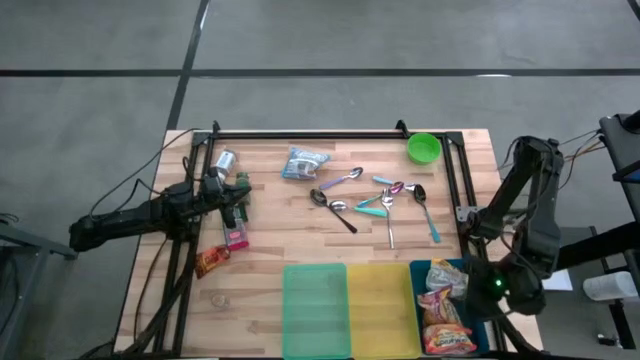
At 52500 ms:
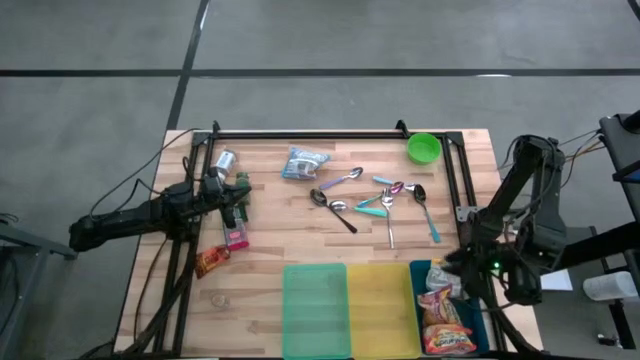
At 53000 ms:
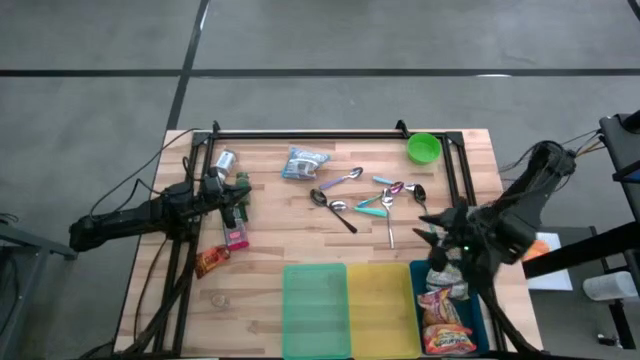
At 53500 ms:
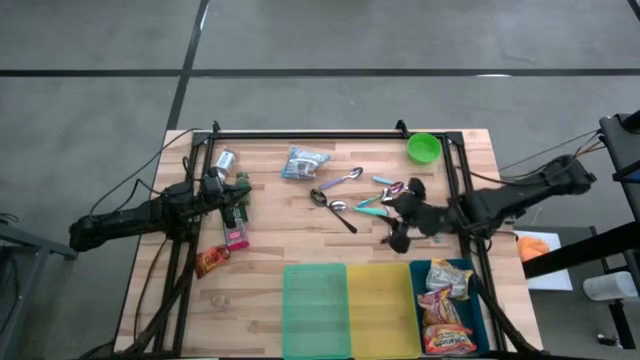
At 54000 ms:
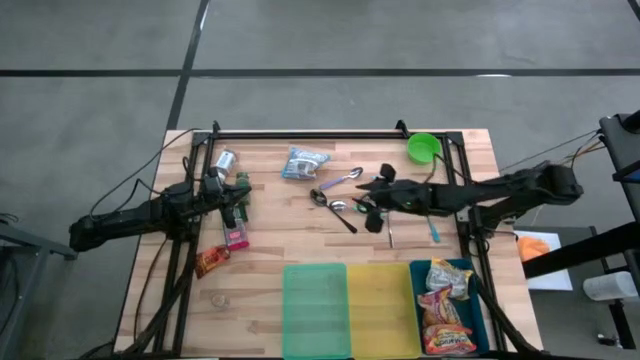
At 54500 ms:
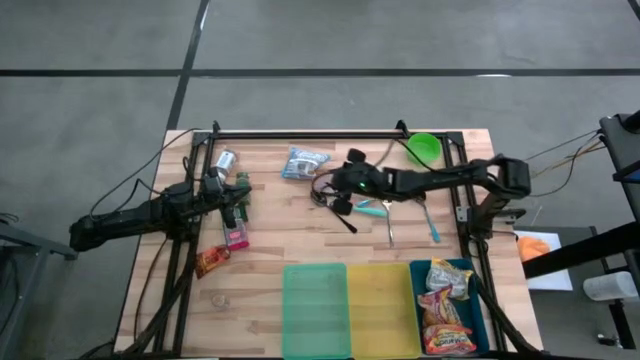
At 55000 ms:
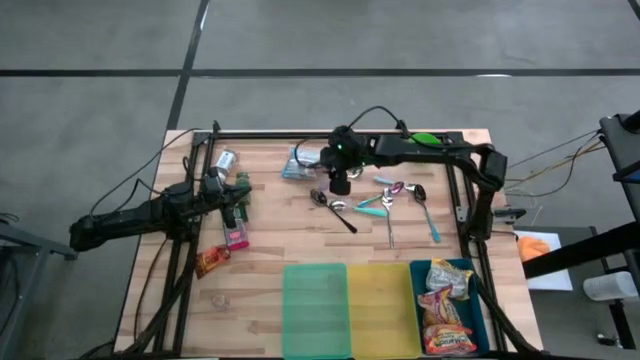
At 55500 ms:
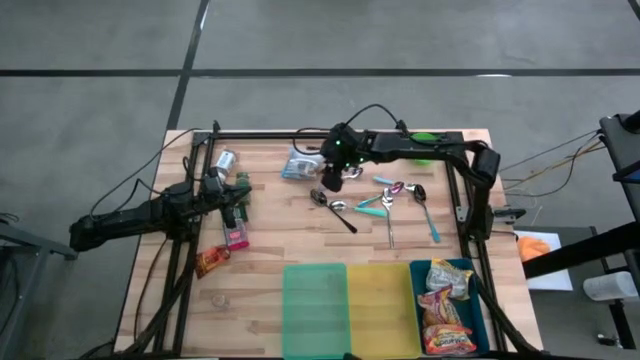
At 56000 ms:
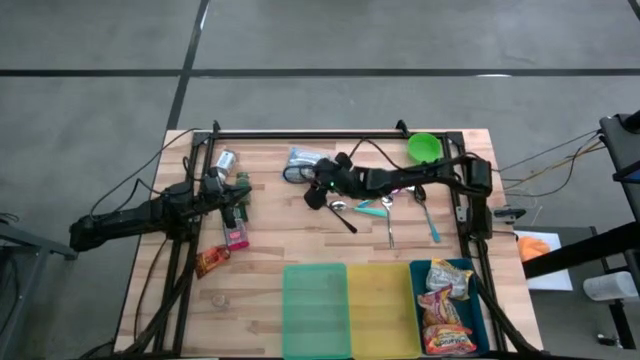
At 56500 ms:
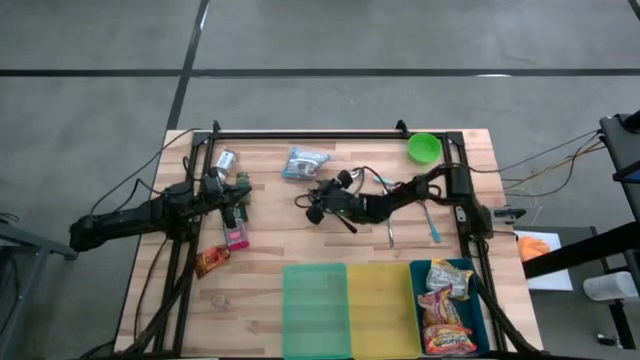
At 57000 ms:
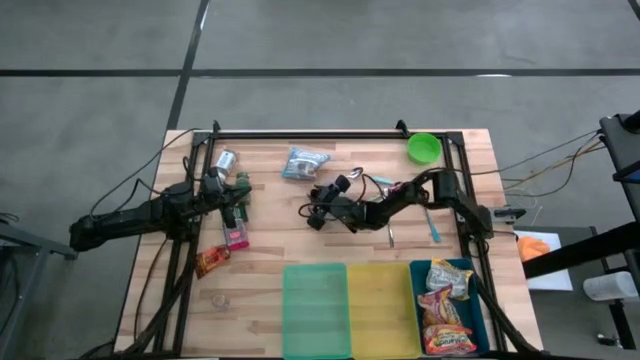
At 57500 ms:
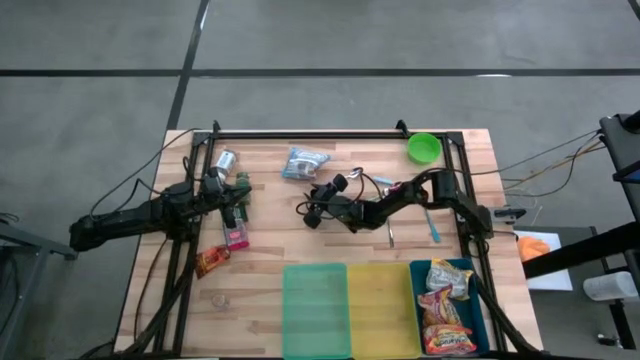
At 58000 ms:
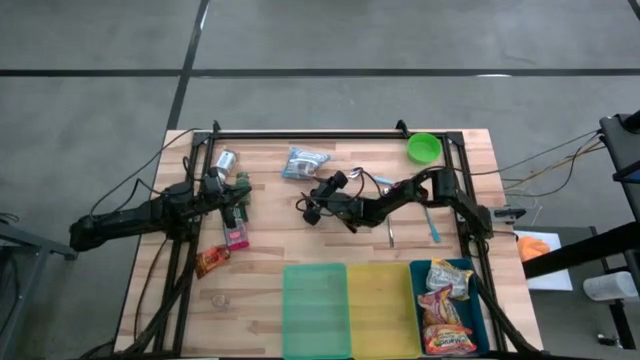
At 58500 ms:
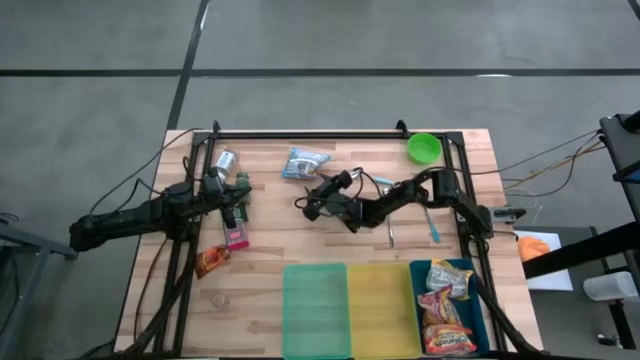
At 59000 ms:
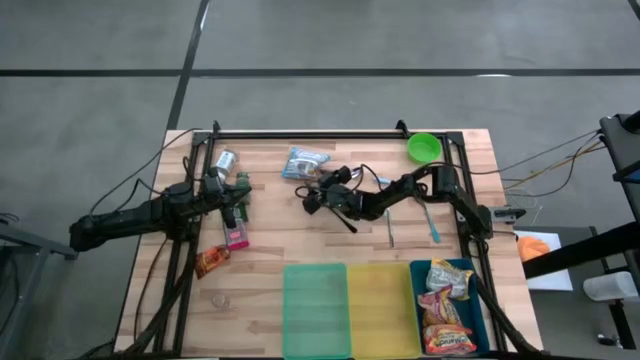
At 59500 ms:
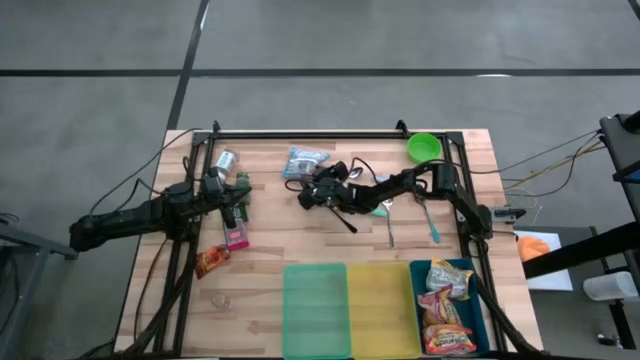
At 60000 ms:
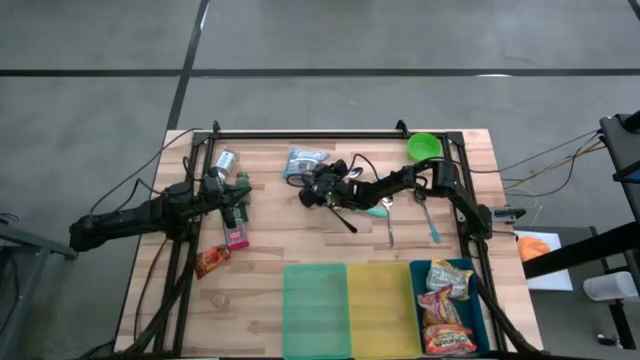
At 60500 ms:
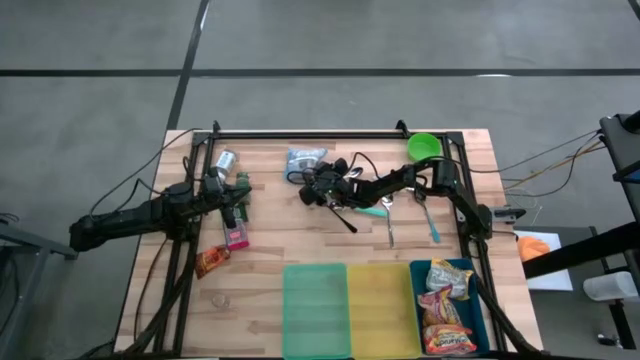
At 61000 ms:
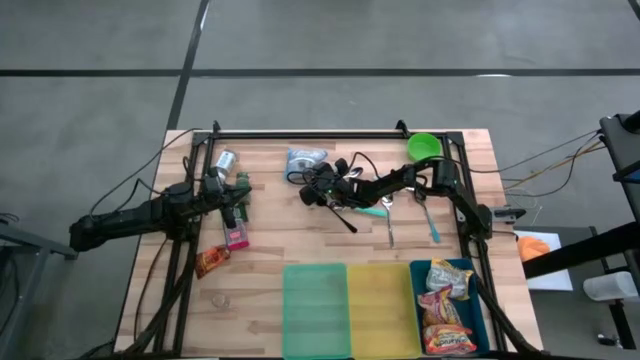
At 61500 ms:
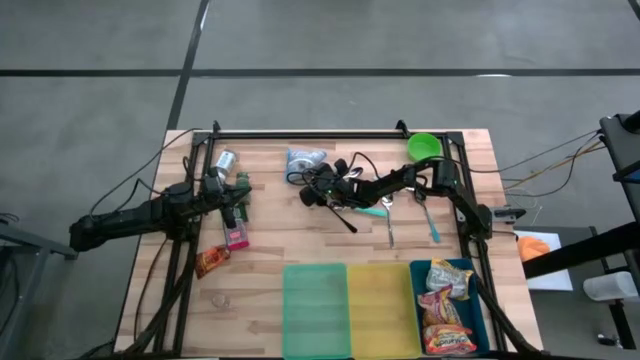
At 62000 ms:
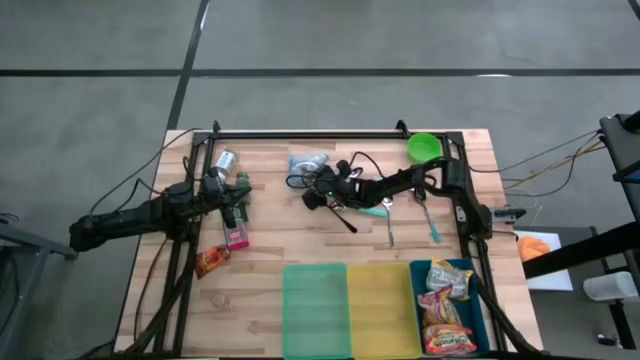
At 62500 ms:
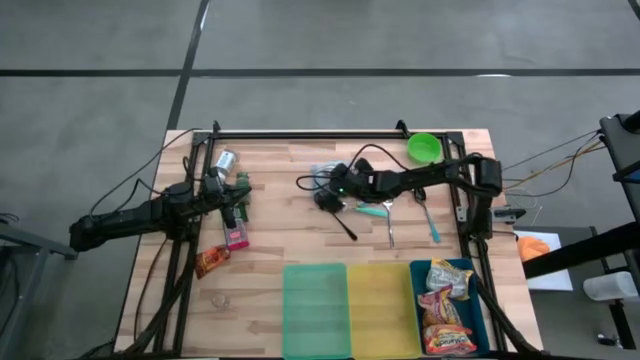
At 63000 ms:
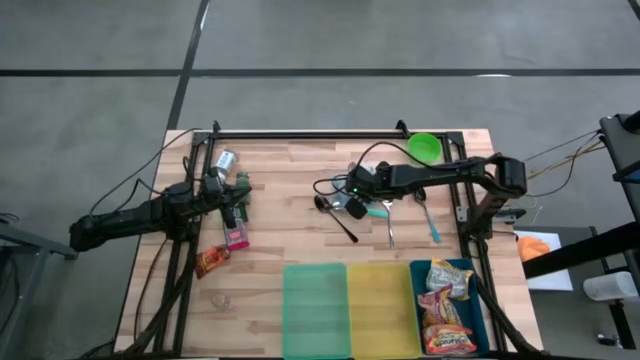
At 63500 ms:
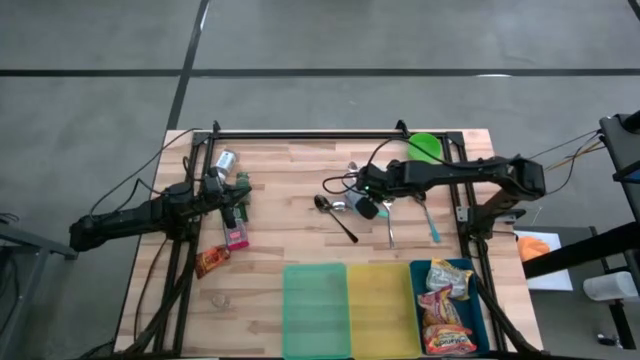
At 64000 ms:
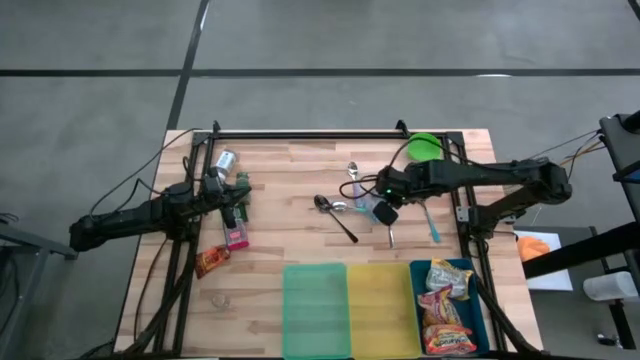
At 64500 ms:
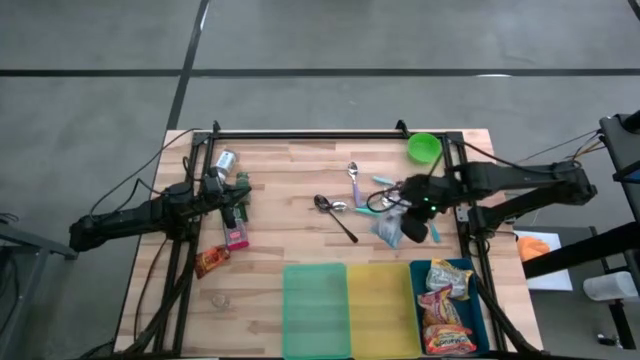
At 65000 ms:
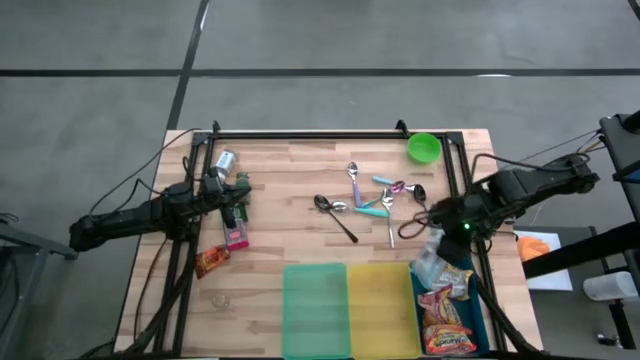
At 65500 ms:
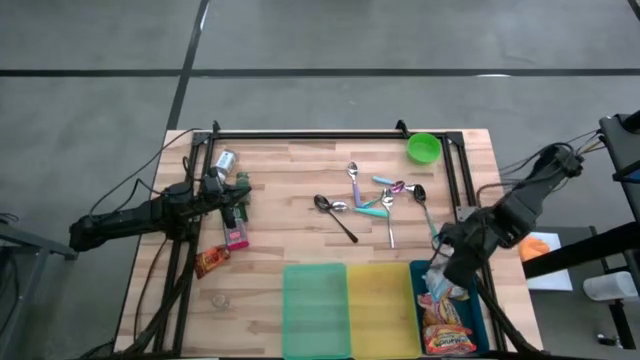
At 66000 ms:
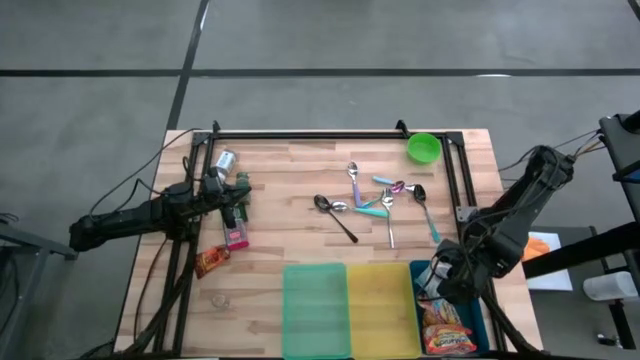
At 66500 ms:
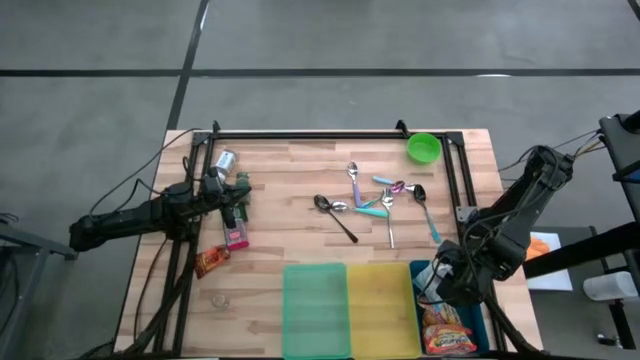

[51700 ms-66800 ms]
Put the blue noodle pack into the blue bin
